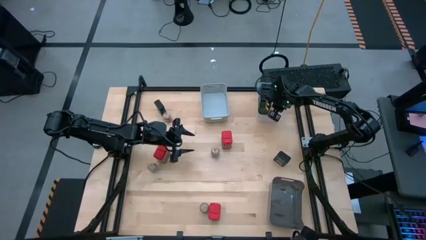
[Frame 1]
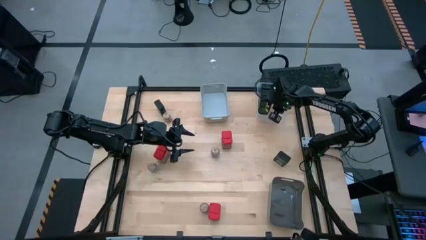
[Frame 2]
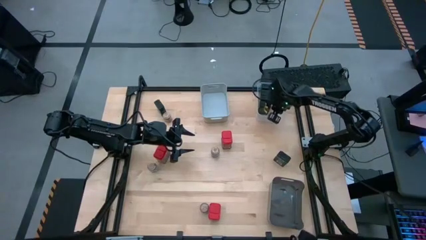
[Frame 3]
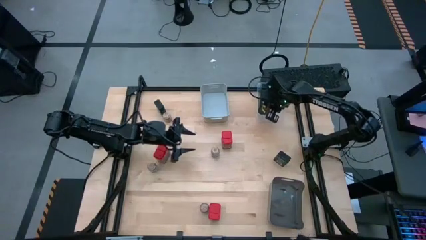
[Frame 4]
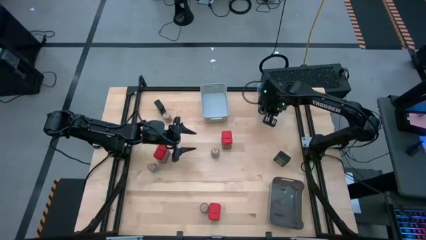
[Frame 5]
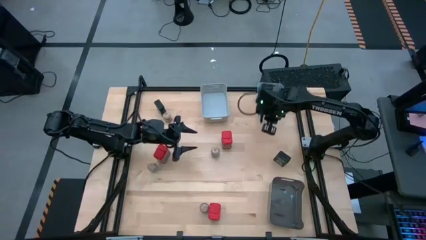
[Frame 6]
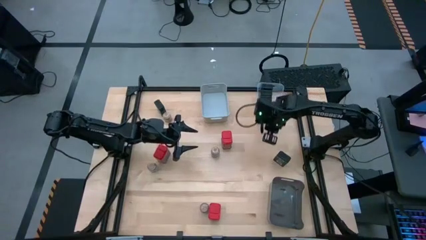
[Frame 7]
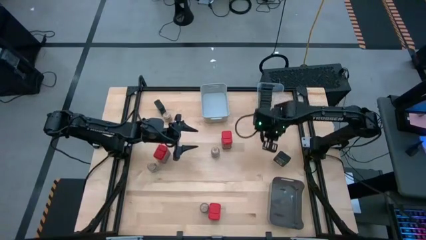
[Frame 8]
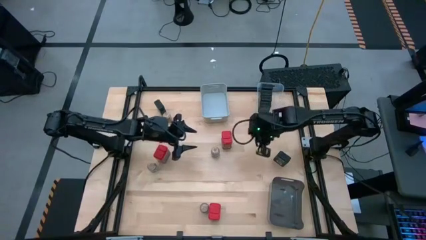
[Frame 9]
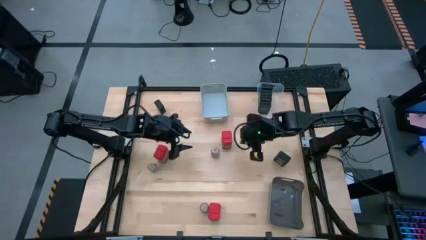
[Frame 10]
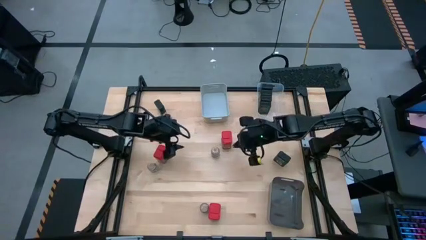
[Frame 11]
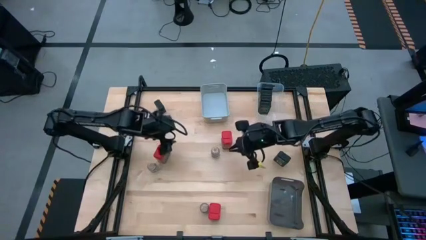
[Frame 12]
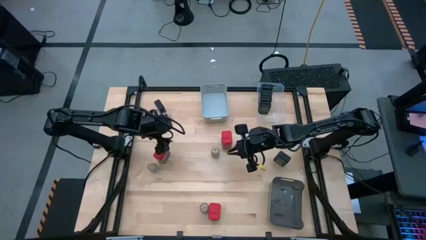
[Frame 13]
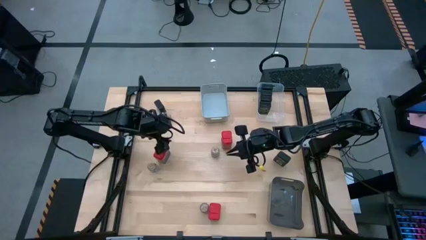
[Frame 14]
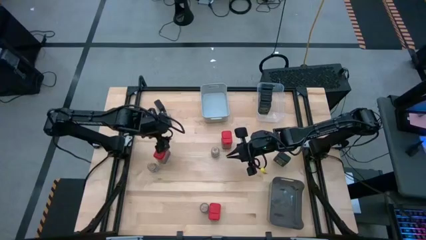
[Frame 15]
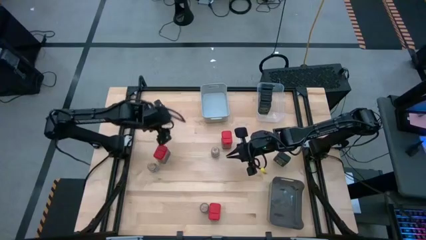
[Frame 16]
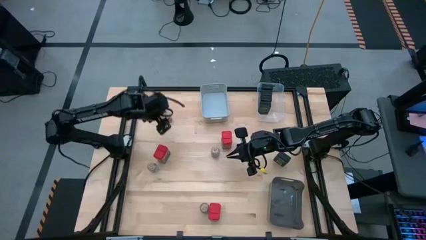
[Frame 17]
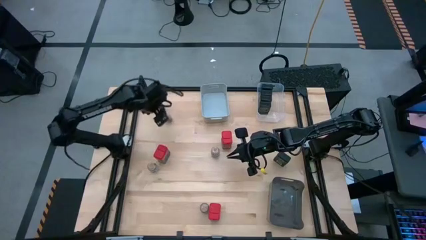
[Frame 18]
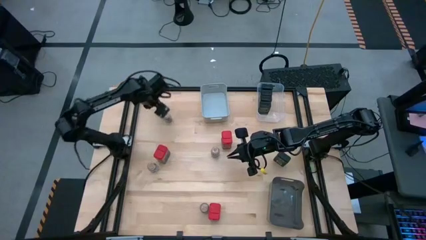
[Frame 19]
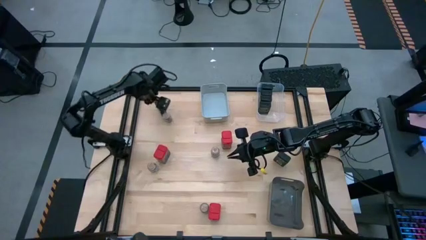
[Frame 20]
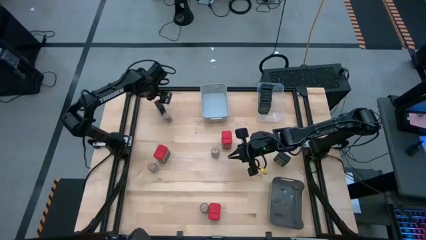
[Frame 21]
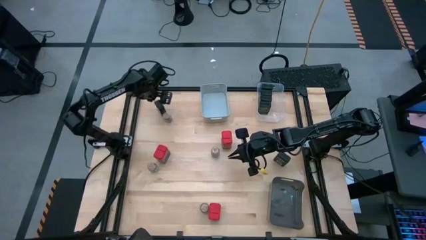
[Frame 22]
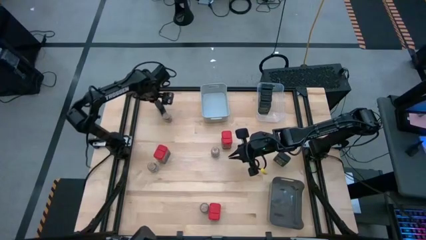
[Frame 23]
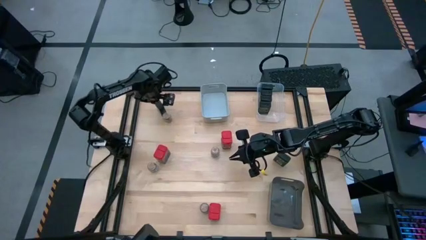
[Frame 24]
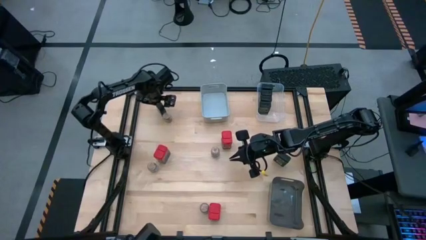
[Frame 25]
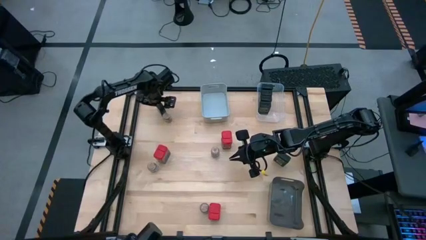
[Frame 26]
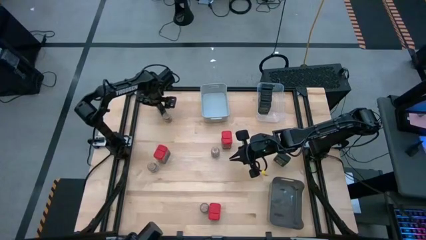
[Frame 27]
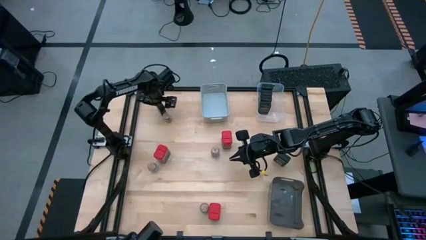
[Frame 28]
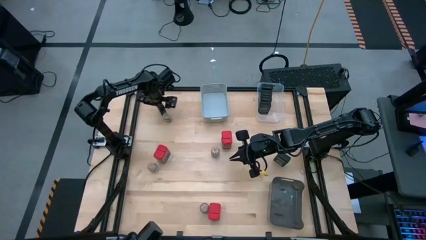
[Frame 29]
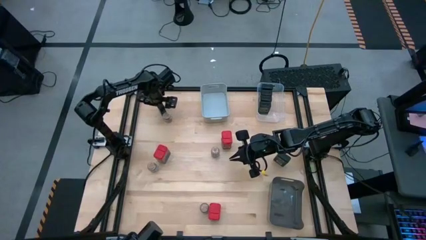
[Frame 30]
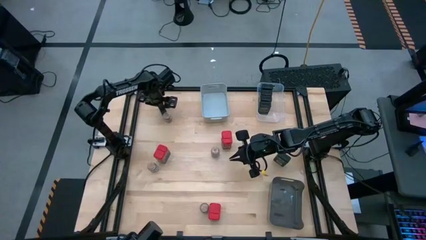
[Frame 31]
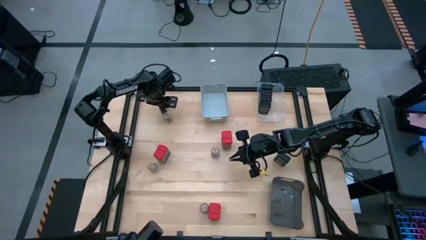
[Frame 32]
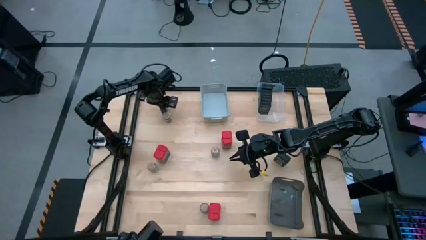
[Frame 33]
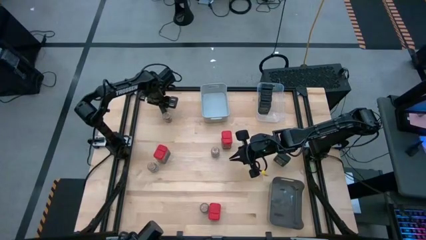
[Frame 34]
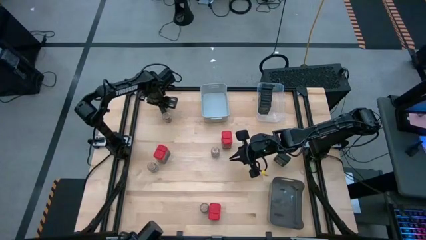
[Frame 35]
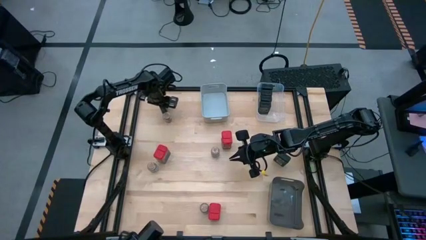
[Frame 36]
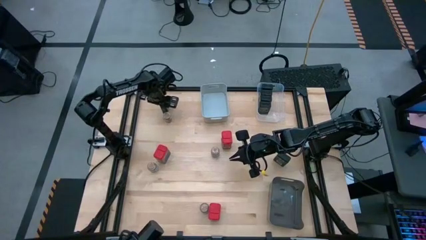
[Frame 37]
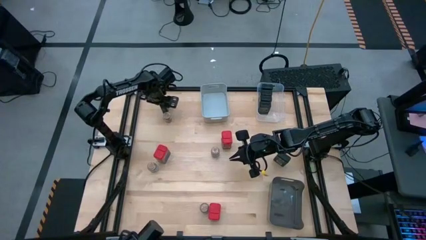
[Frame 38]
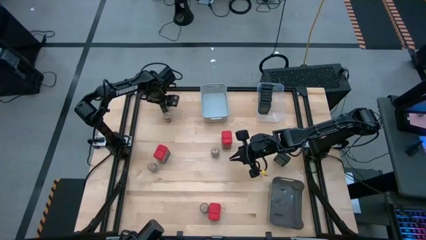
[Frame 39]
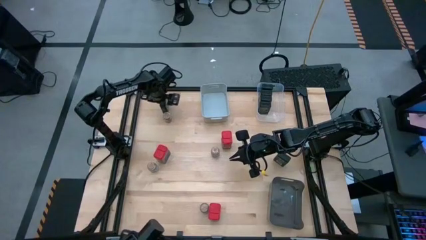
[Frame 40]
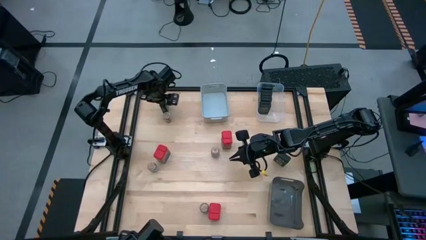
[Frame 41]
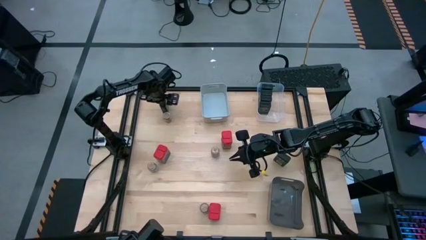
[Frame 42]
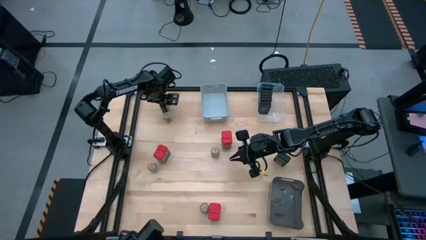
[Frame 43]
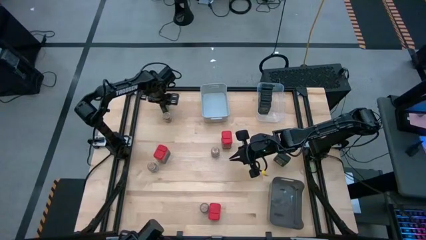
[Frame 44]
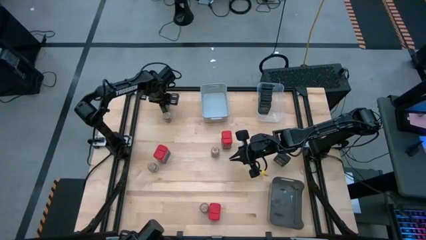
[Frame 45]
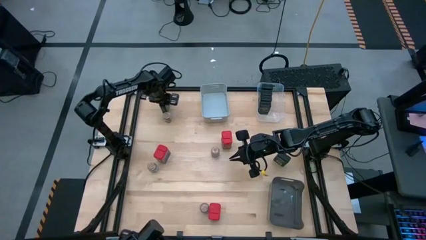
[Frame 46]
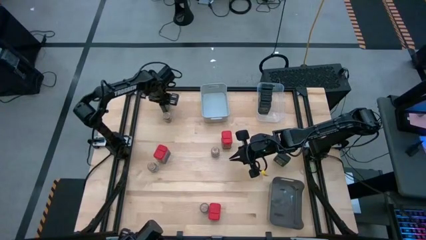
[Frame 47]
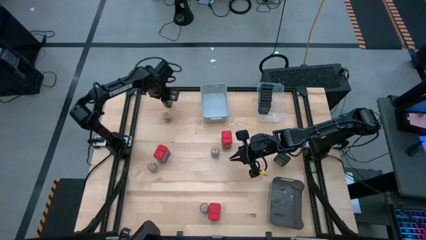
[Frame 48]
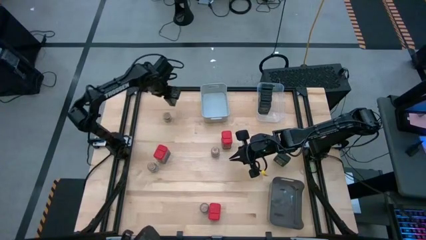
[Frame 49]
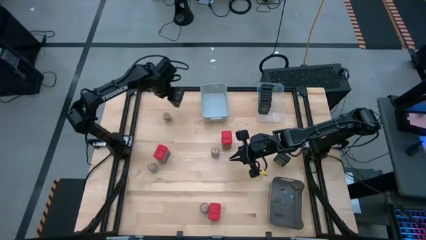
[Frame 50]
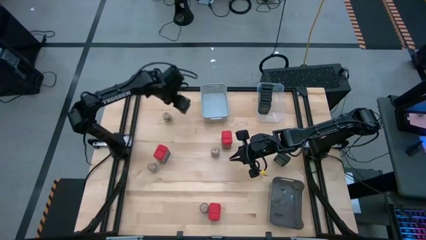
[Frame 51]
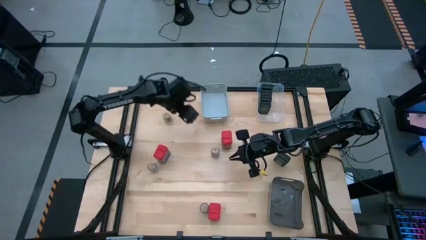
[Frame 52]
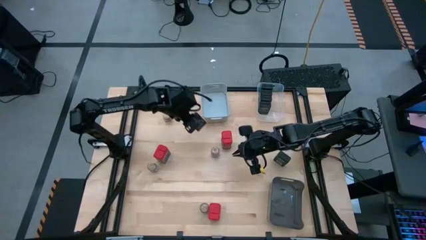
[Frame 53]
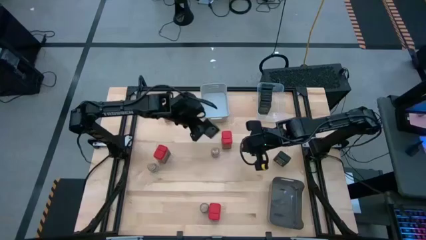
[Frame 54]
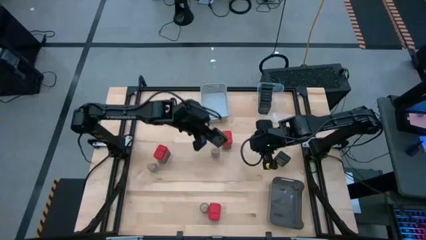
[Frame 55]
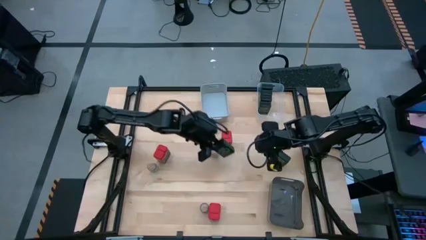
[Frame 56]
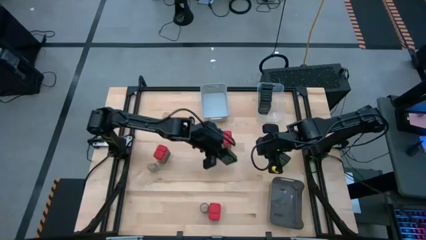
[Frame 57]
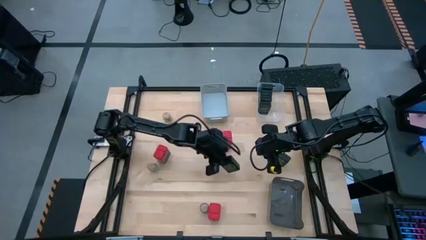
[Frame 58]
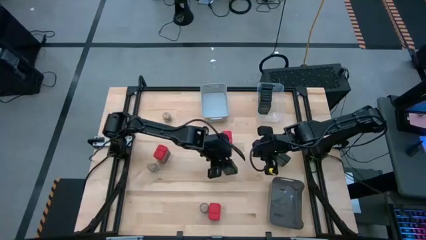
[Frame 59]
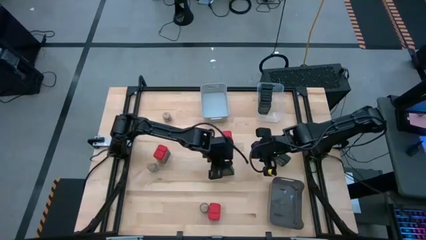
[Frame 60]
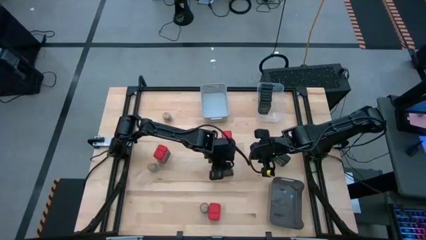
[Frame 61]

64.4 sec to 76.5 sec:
Task: Sort spices by type
Put the black seasoning can into the transparent bin
